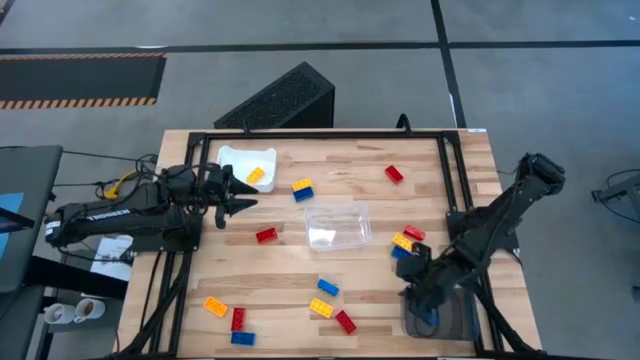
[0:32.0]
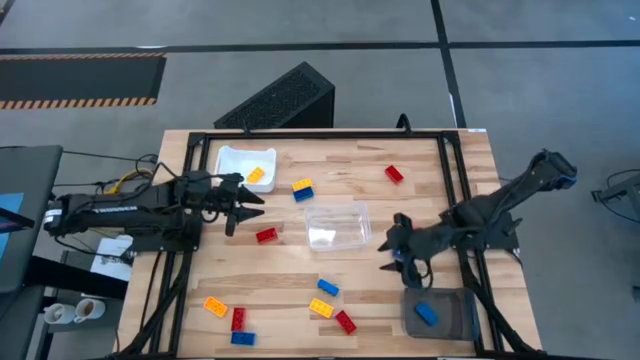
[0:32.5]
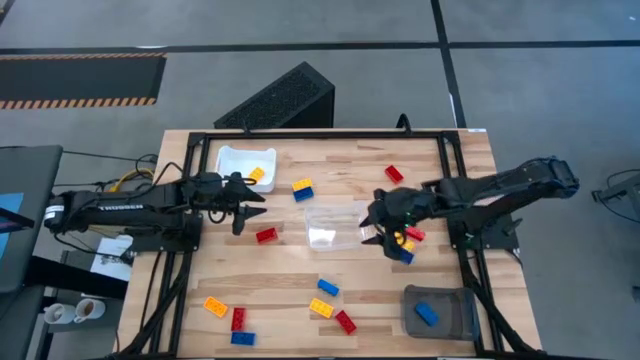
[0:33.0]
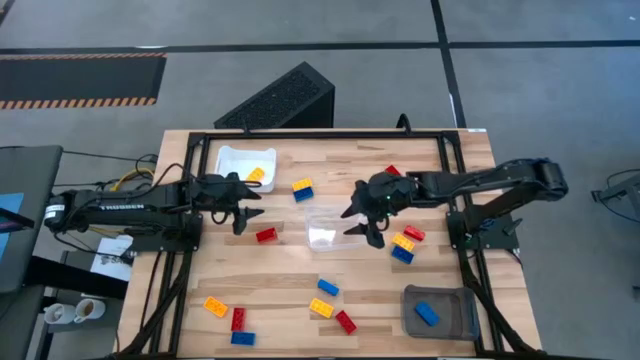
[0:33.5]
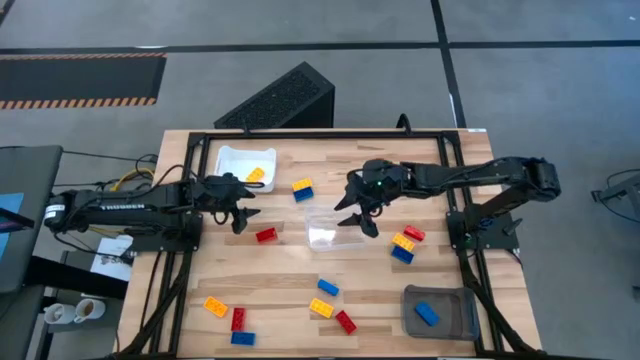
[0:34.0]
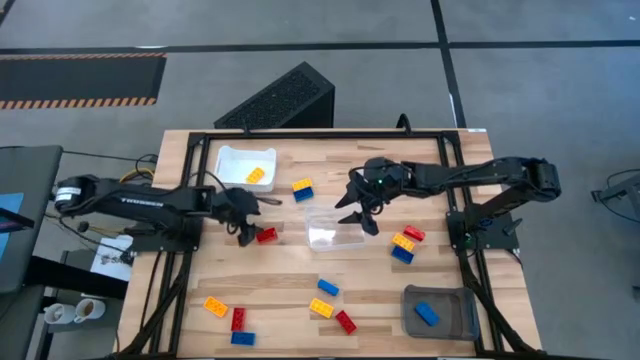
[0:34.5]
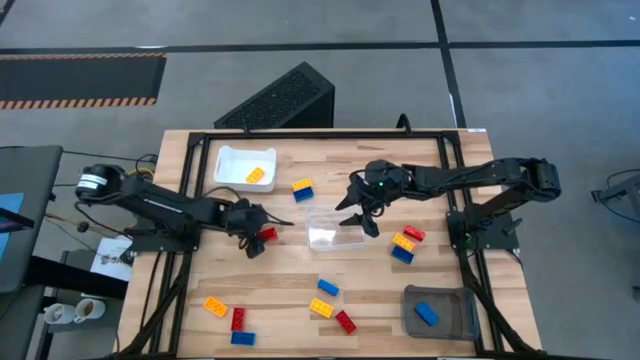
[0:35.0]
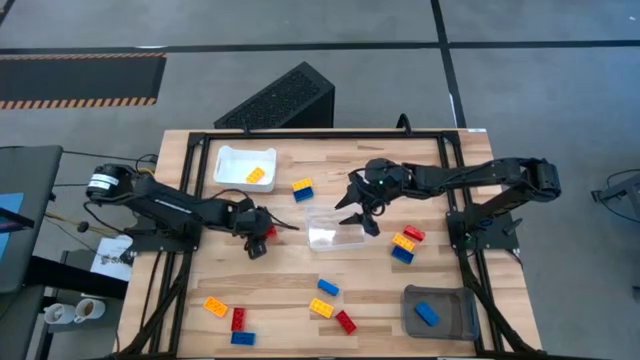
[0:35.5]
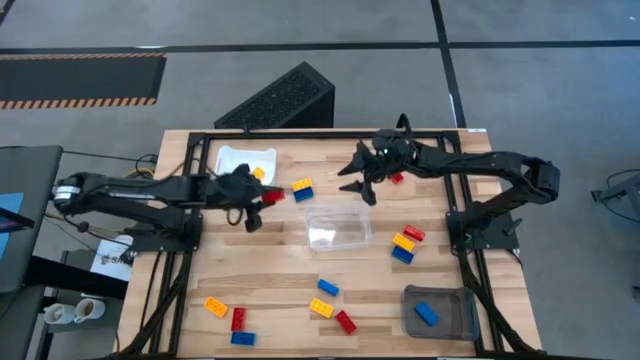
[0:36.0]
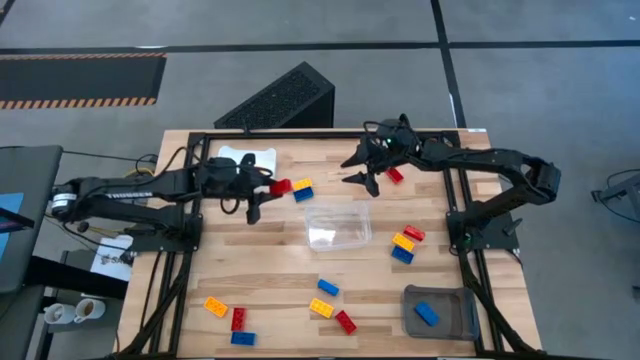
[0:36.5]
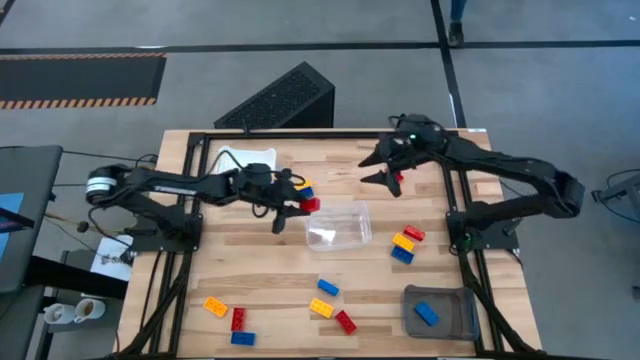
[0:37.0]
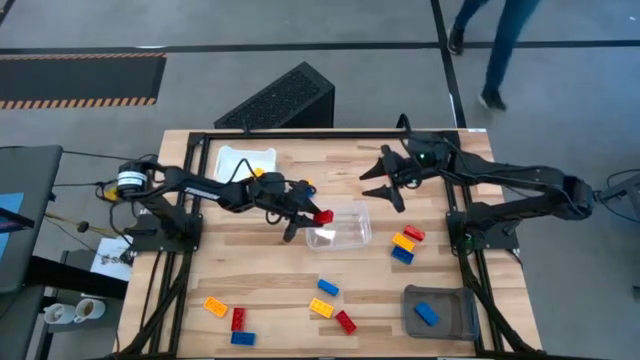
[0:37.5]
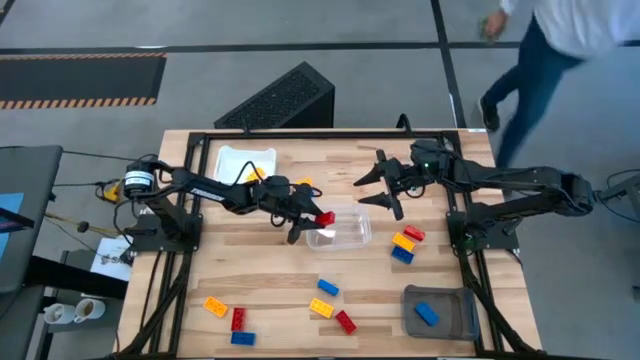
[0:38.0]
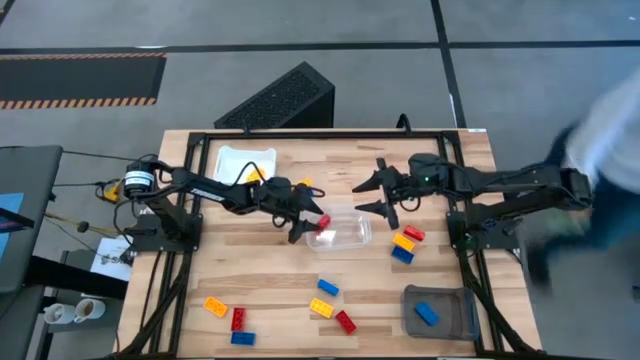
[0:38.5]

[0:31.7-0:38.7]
Task: Sort & place blocks by color
Put the red game piece into the transparent bin

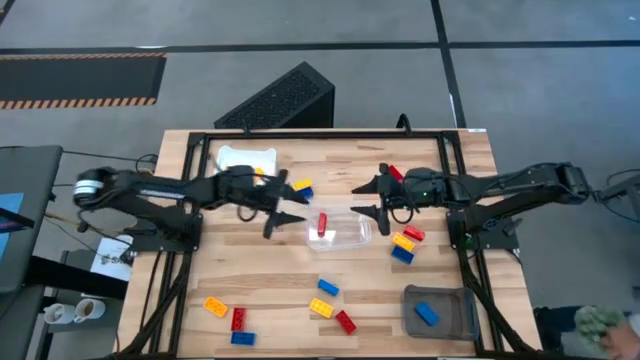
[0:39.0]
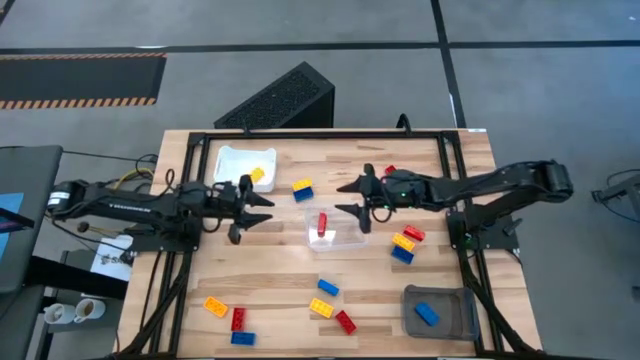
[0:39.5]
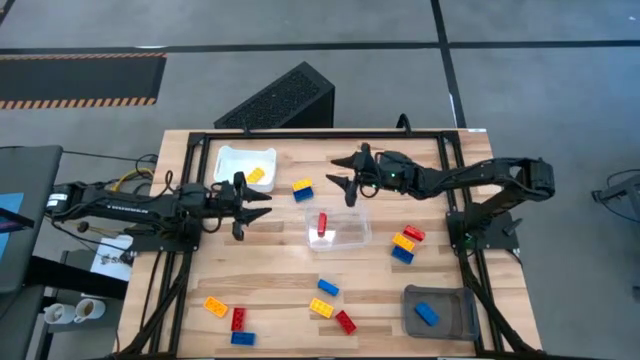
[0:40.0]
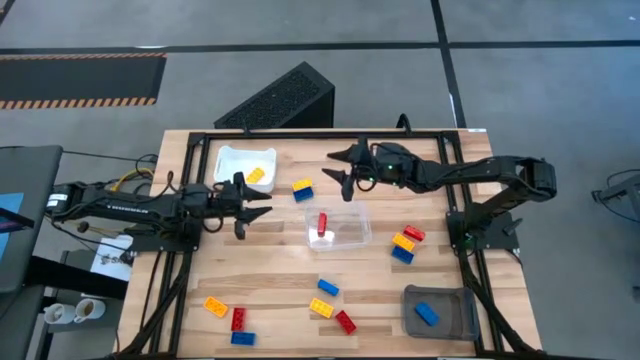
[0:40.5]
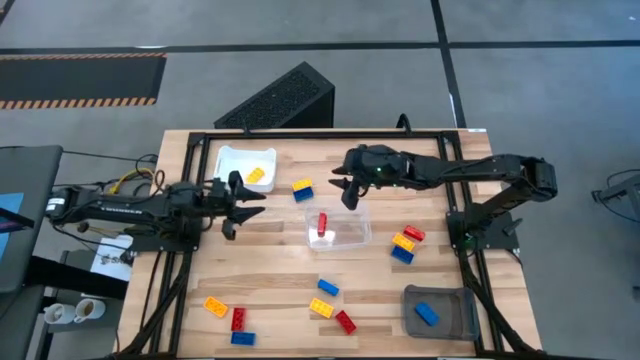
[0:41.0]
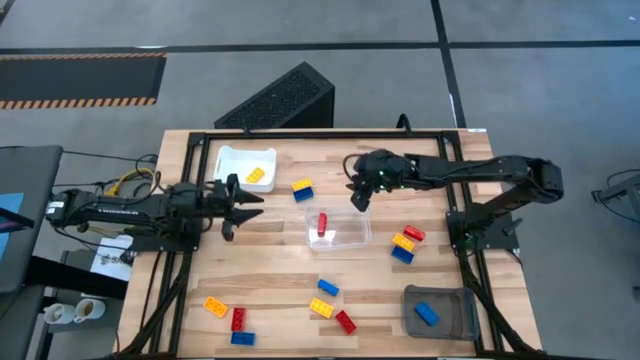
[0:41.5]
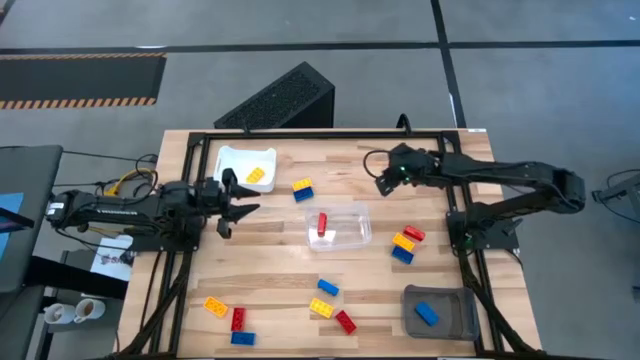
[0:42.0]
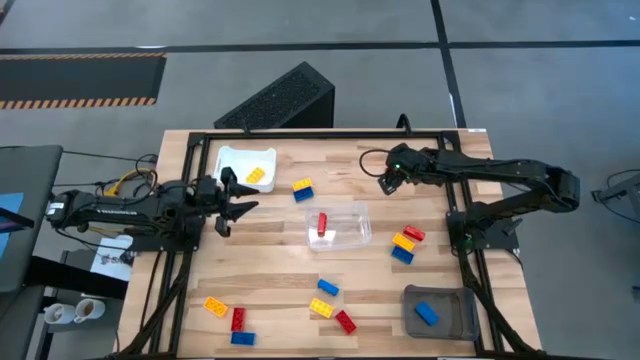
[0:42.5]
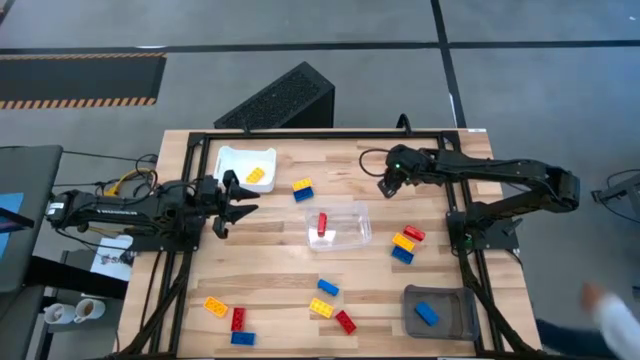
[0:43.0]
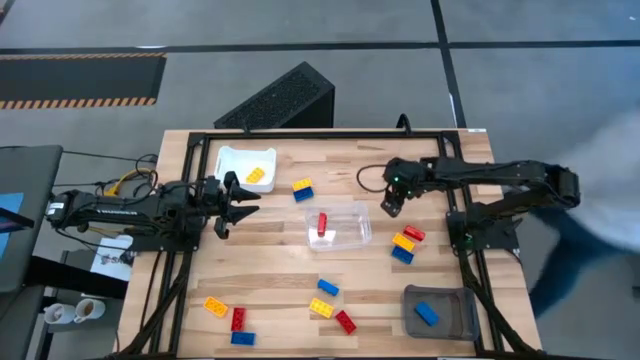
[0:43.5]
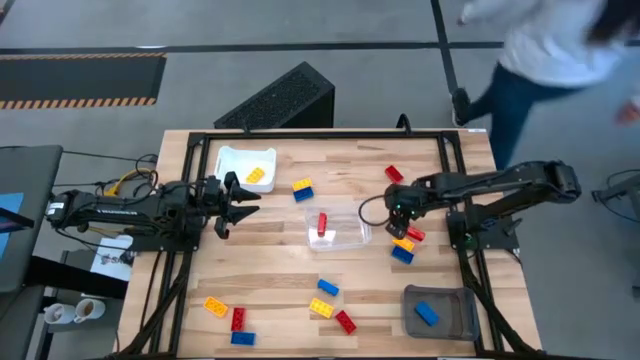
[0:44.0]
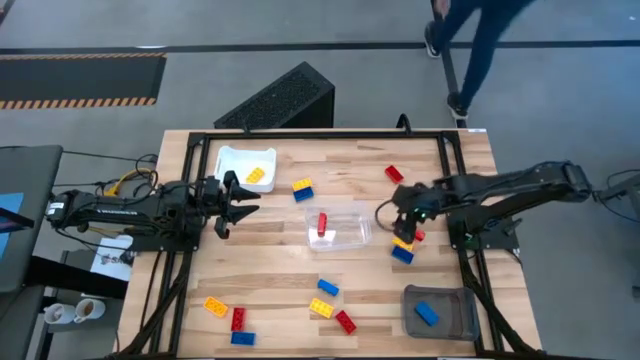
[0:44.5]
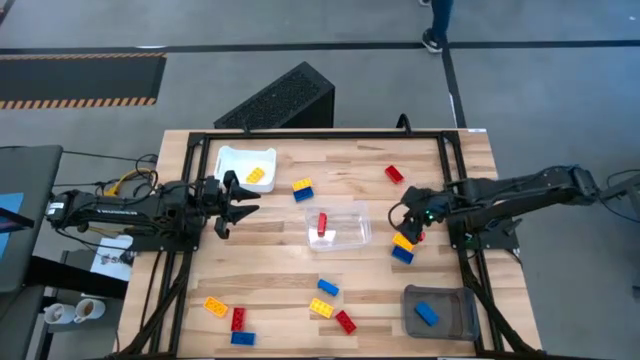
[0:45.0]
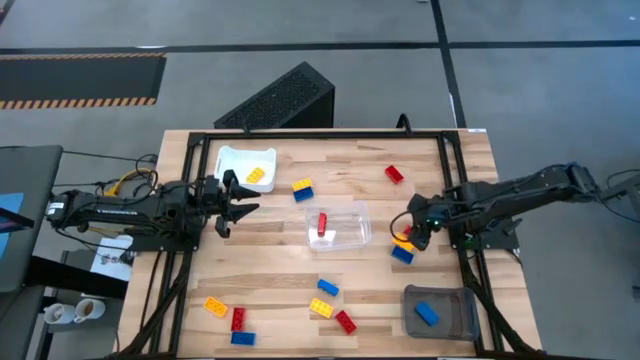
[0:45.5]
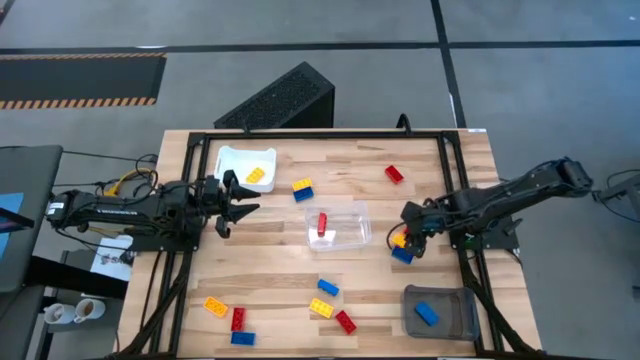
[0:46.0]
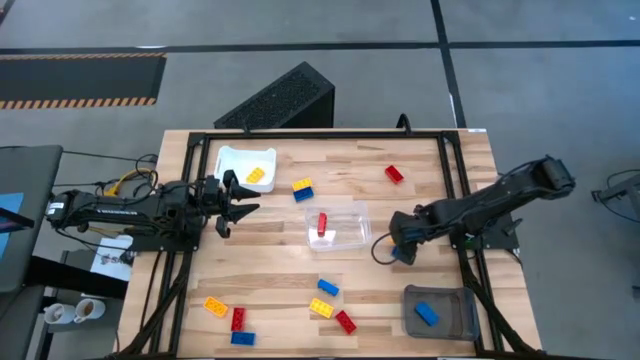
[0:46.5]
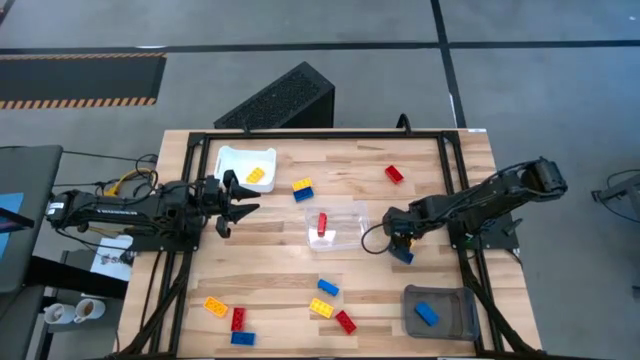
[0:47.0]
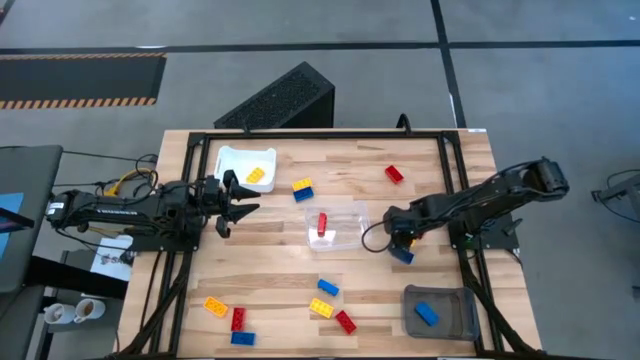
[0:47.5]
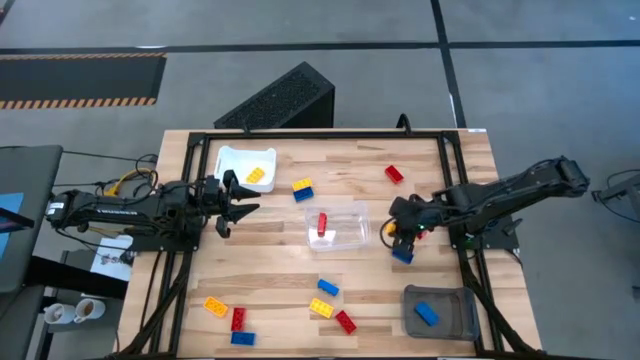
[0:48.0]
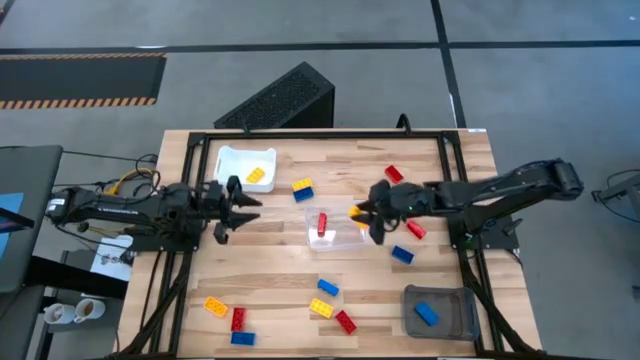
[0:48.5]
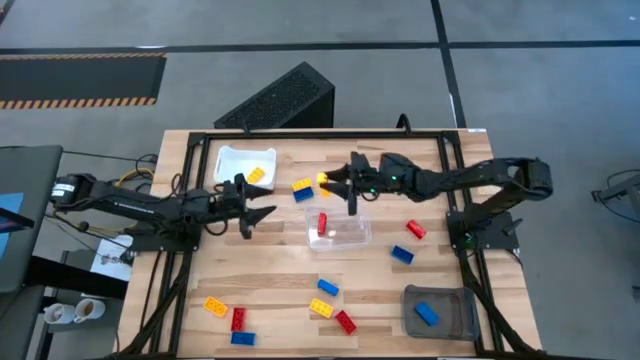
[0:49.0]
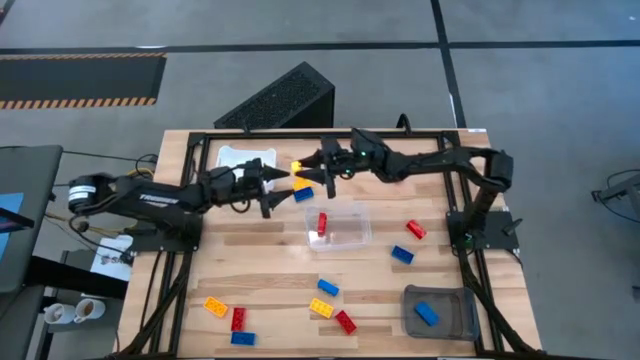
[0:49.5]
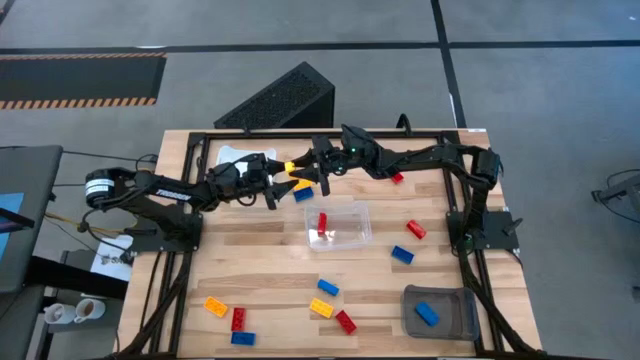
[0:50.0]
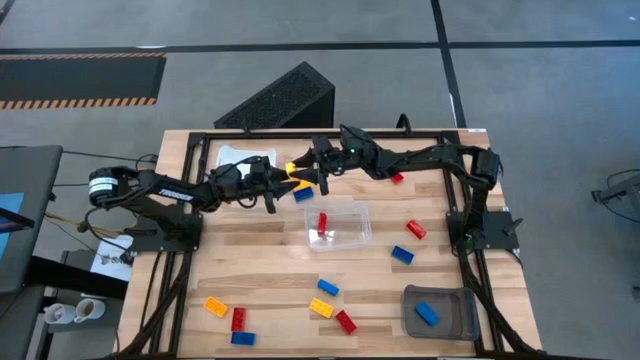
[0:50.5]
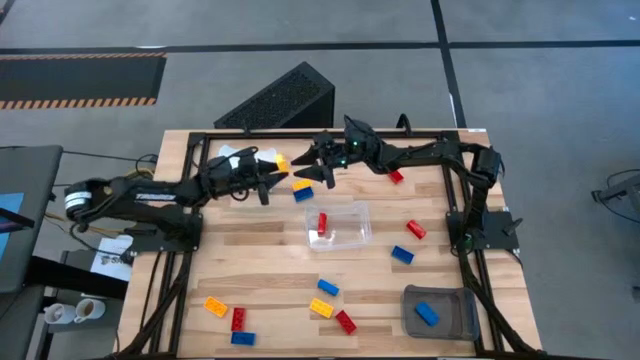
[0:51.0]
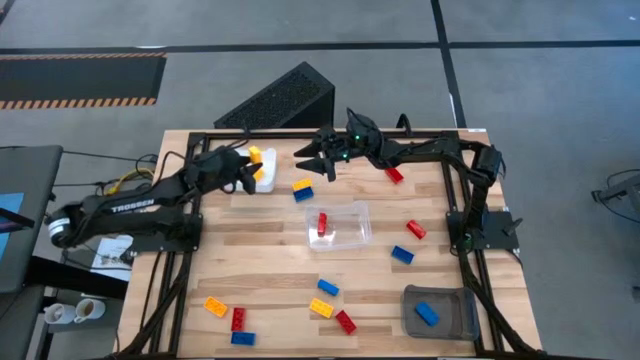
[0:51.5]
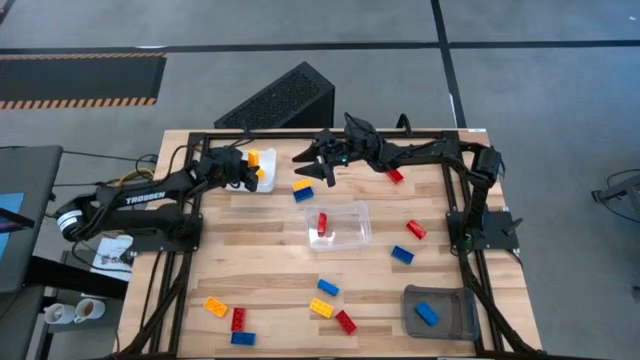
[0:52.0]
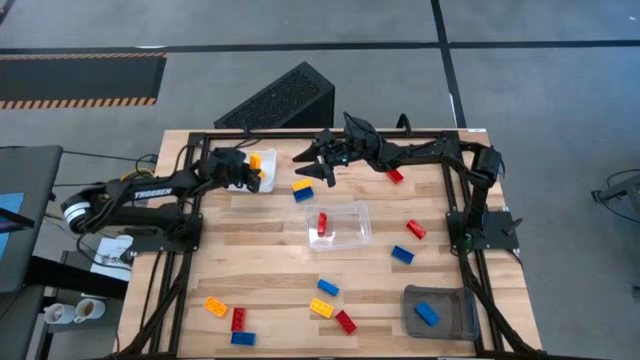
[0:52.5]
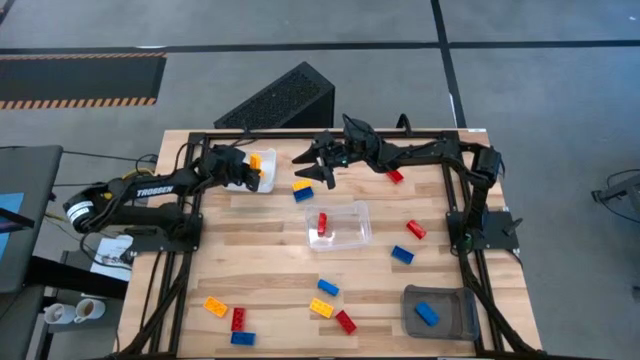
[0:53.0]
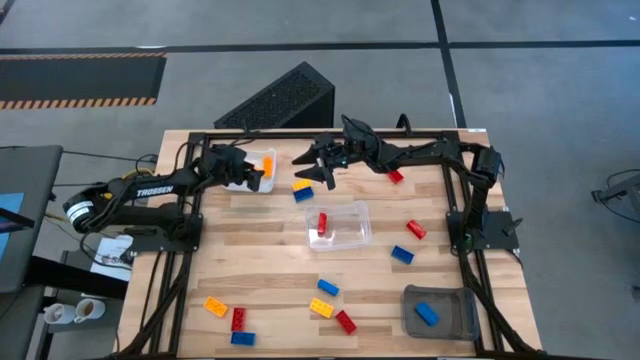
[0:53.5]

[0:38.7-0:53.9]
Put the yellow game piece into the white bin
